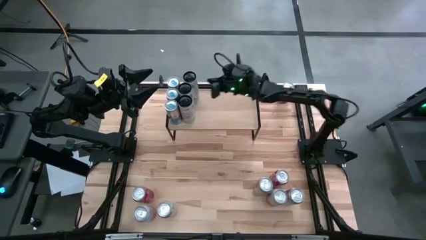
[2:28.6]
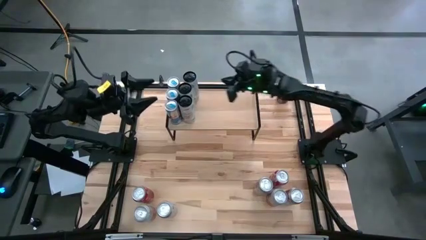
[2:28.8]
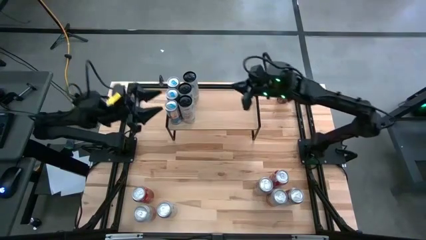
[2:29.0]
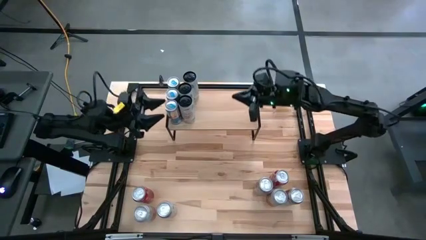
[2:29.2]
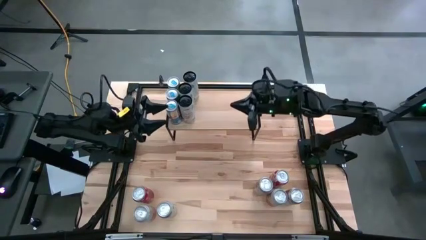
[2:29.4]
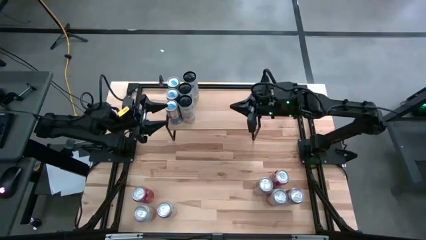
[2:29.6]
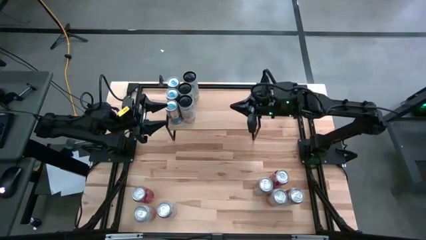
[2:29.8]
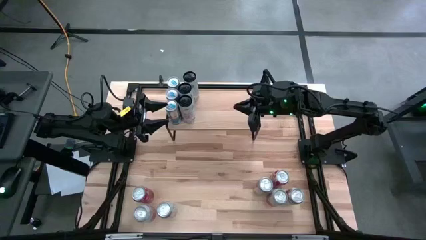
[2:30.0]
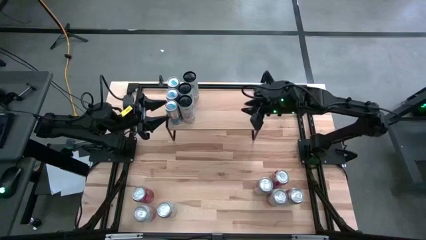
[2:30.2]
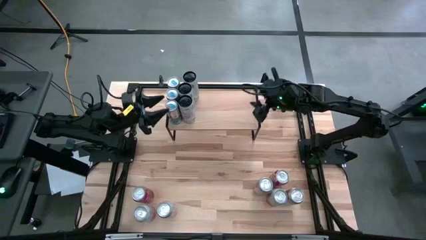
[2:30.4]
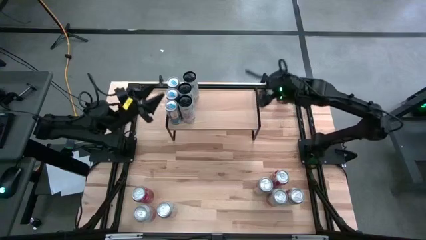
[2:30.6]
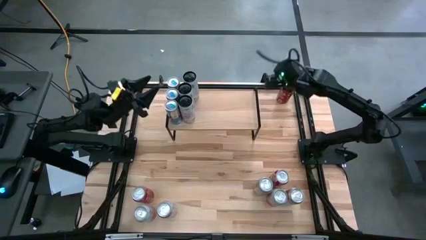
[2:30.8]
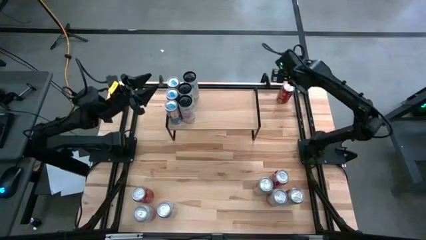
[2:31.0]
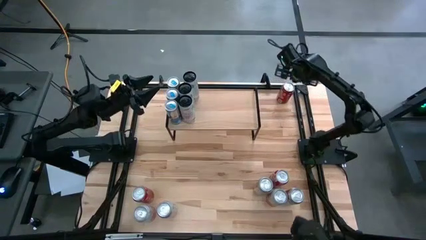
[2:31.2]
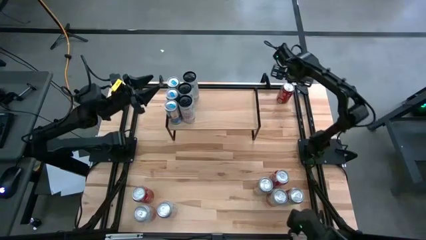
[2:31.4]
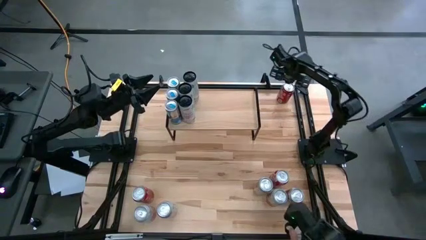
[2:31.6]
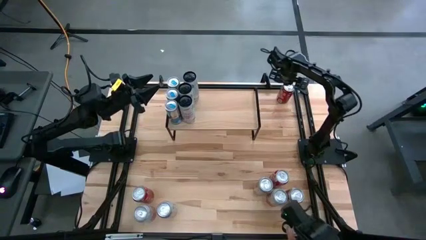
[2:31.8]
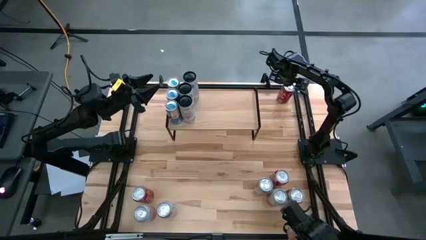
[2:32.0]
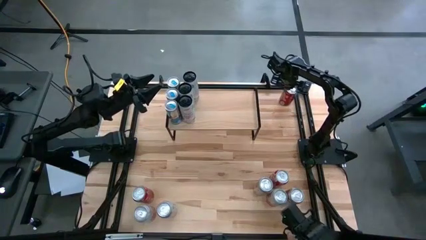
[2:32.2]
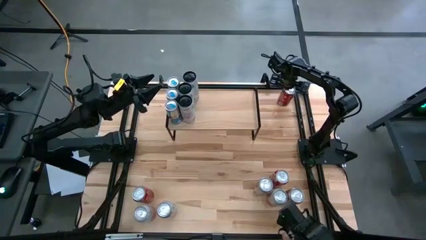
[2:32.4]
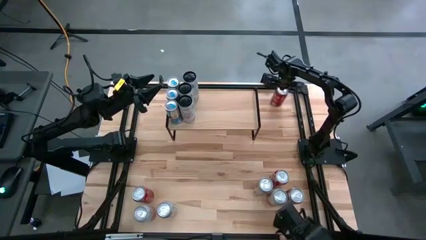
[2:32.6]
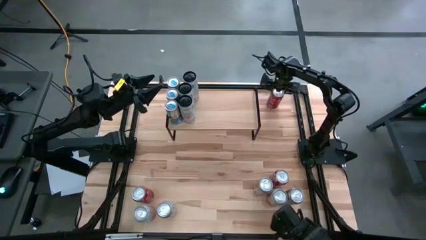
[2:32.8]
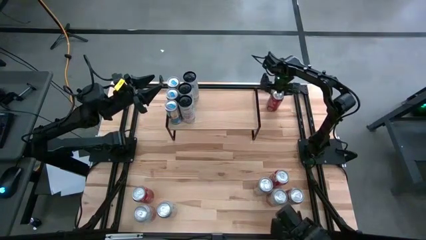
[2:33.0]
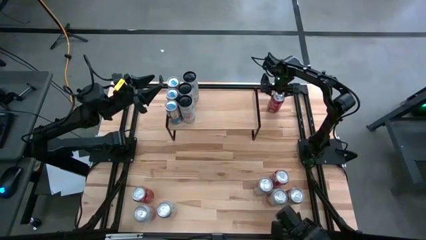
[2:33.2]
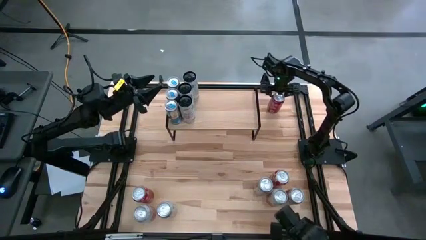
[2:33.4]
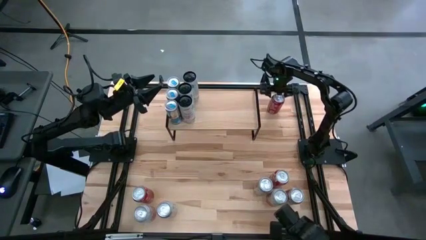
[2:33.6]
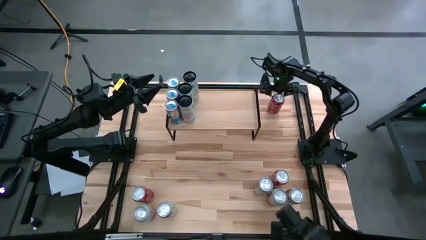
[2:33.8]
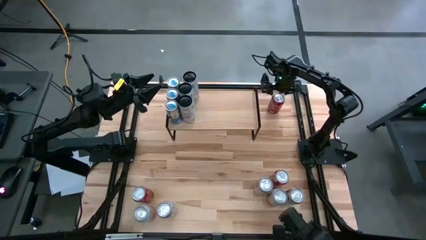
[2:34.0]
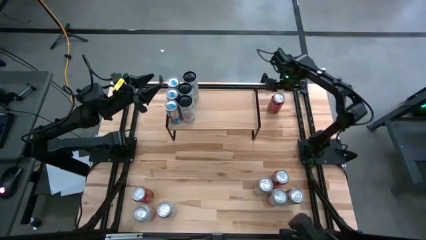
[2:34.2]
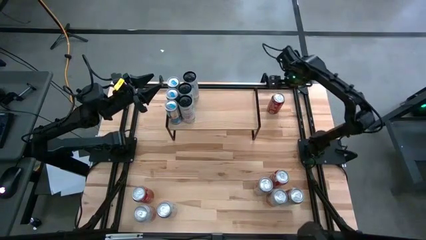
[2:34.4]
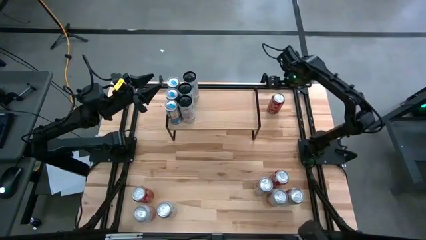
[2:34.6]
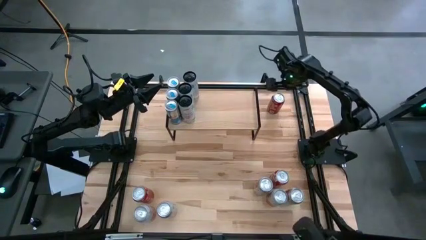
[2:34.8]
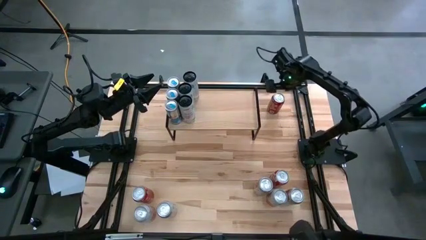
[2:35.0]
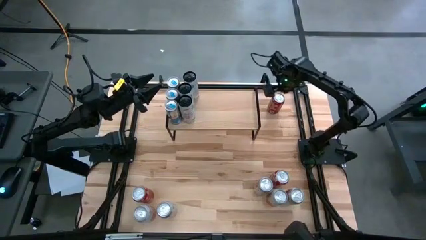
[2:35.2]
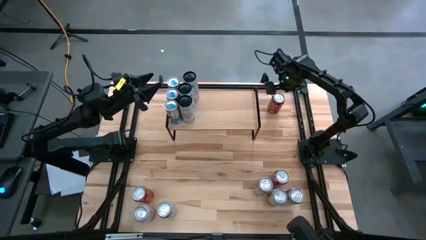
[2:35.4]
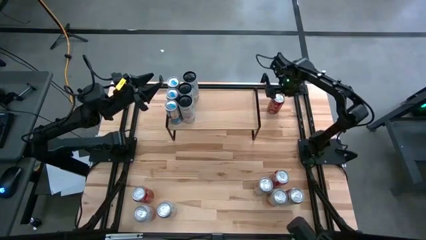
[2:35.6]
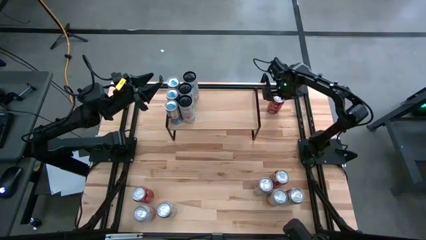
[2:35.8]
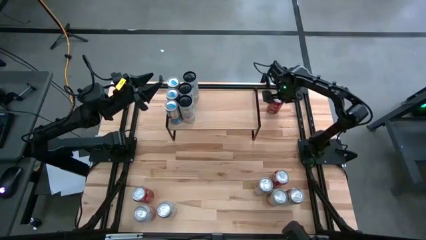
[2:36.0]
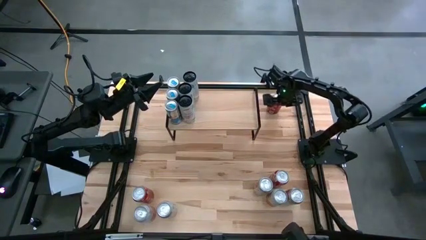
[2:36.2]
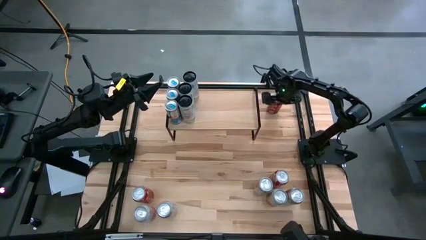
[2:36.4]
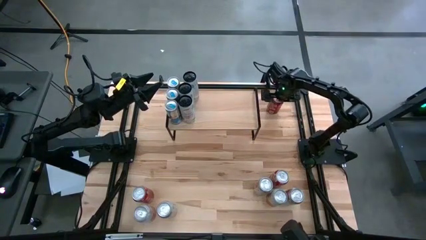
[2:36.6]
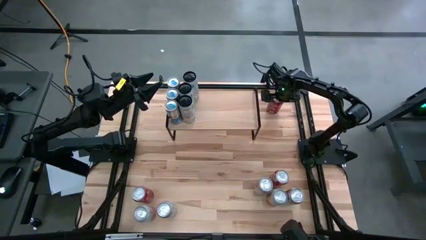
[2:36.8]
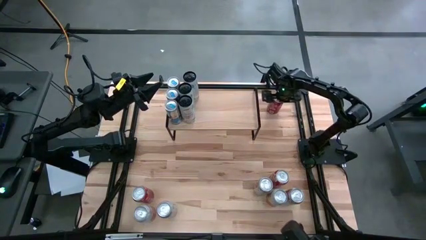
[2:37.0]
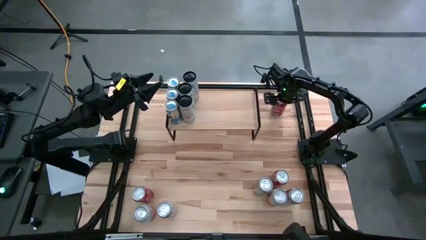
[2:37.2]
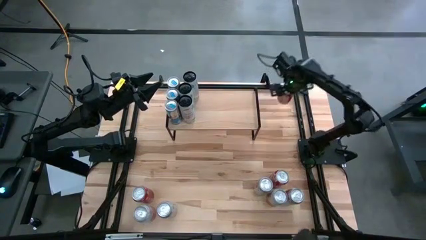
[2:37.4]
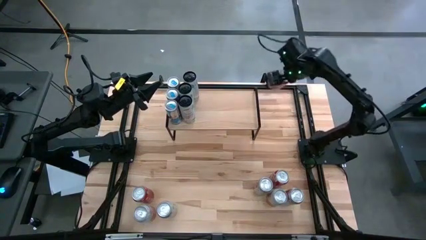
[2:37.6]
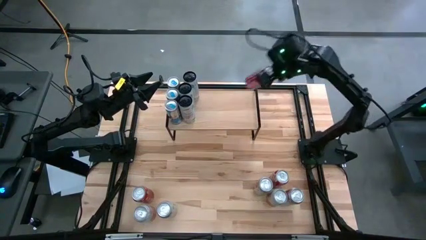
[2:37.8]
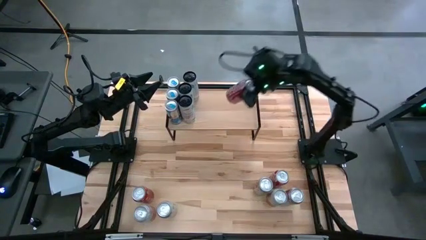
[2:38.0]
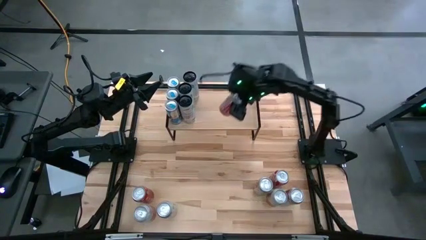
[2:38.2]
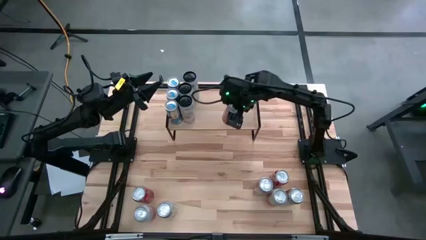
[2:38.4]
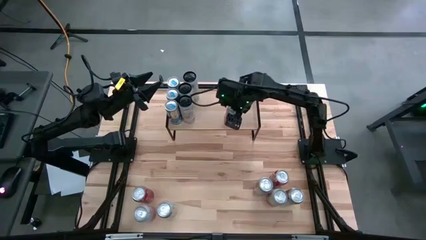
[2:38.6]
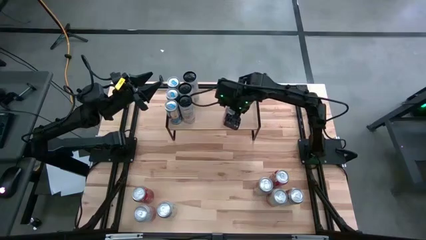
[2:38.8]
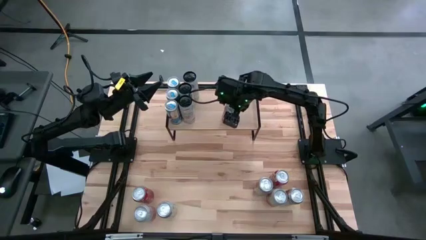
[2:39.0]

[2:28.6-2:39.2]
Task: Place canned beverage on shelf
Put the top red-white soda can on the shelf

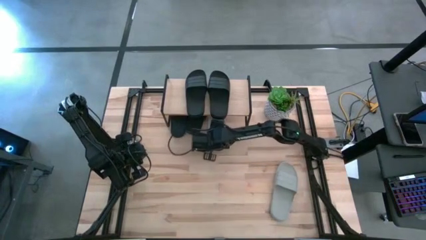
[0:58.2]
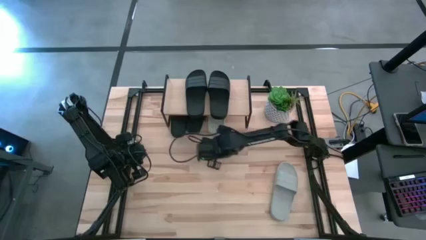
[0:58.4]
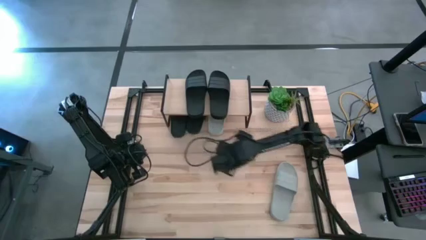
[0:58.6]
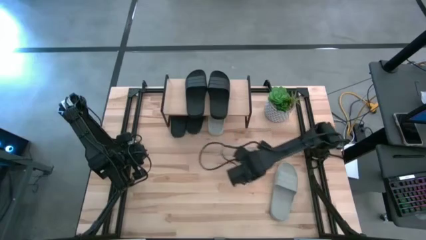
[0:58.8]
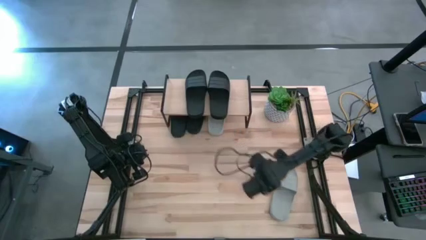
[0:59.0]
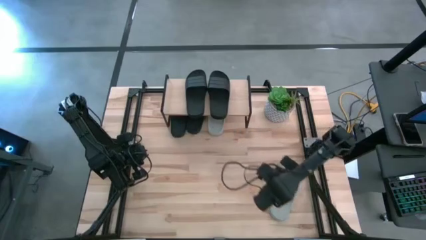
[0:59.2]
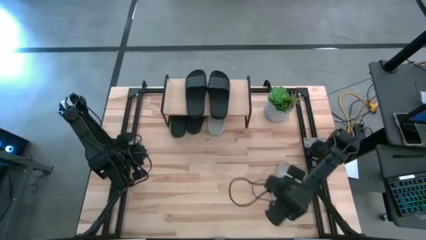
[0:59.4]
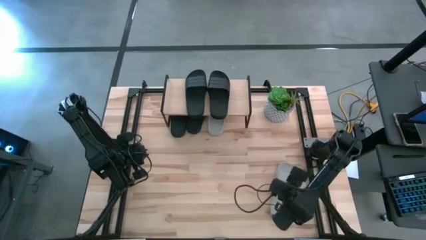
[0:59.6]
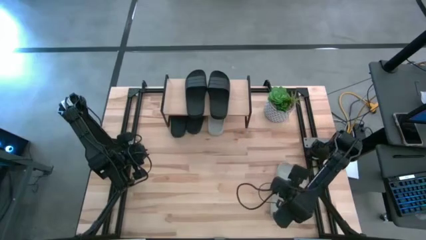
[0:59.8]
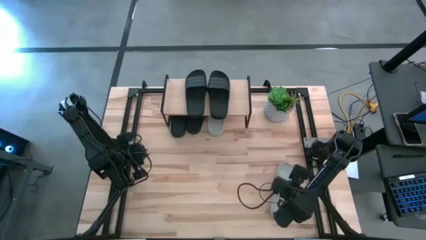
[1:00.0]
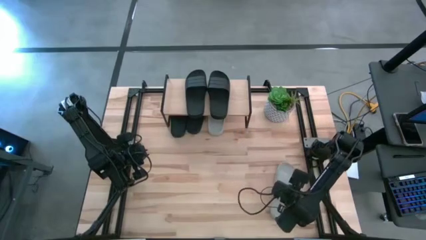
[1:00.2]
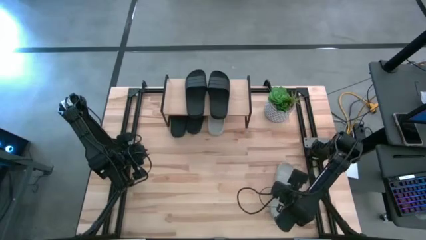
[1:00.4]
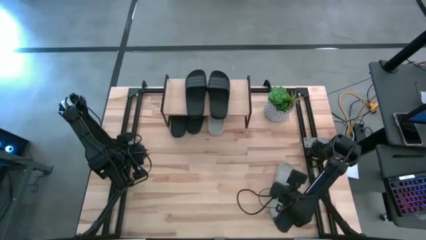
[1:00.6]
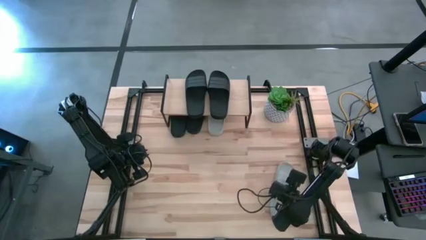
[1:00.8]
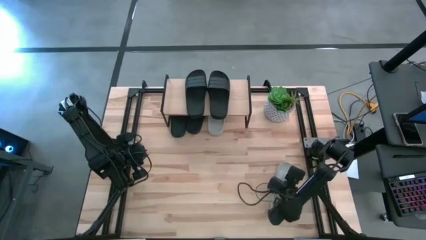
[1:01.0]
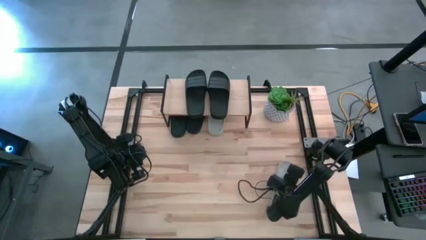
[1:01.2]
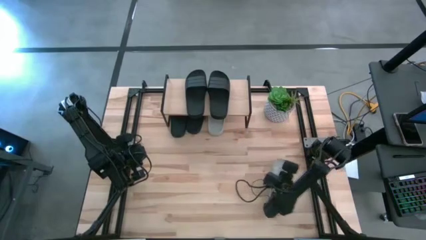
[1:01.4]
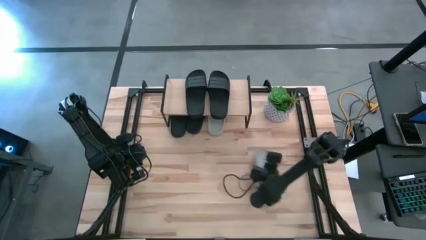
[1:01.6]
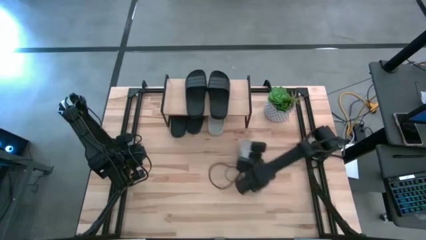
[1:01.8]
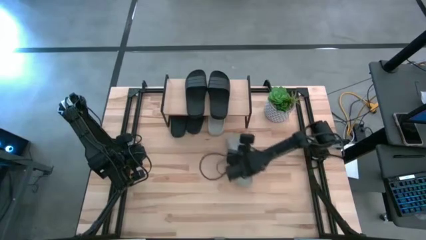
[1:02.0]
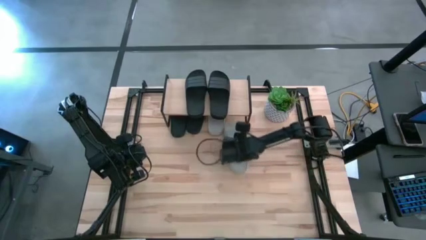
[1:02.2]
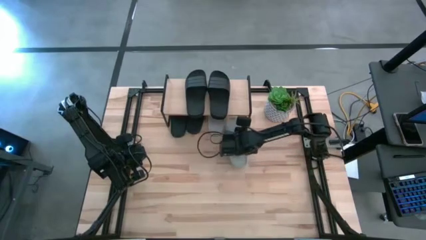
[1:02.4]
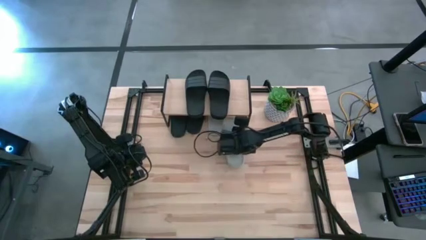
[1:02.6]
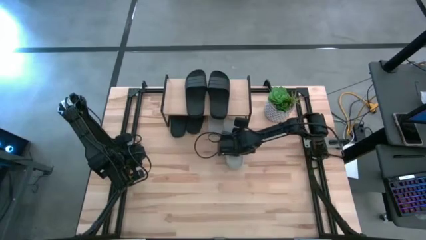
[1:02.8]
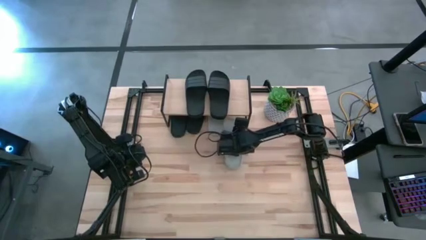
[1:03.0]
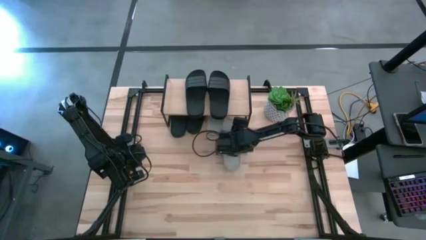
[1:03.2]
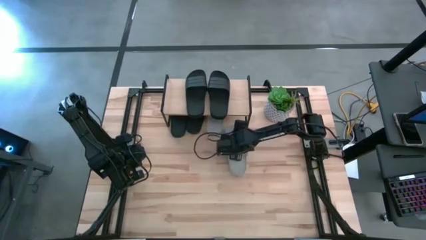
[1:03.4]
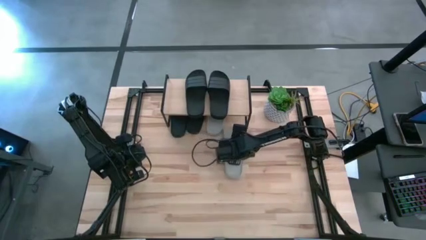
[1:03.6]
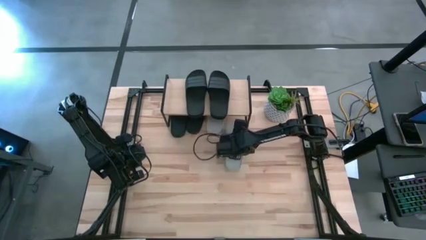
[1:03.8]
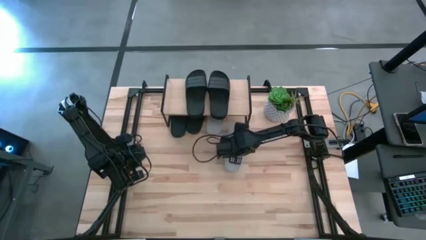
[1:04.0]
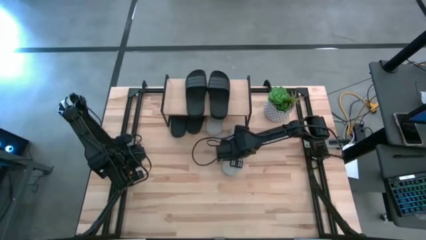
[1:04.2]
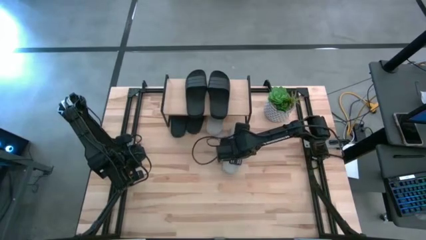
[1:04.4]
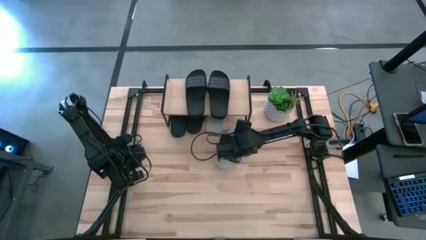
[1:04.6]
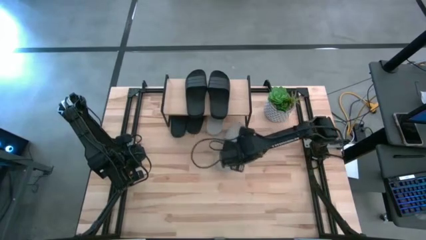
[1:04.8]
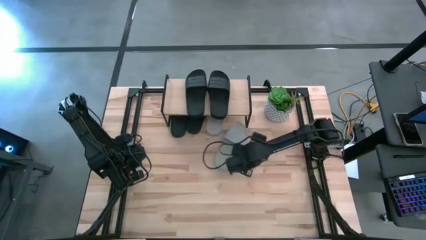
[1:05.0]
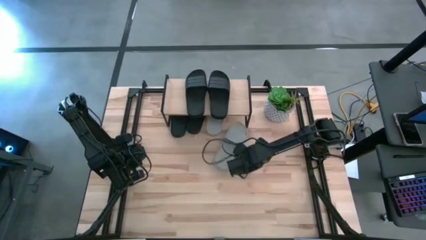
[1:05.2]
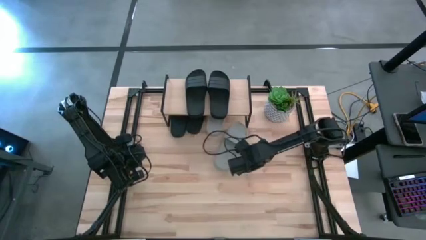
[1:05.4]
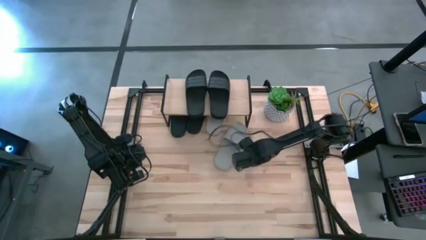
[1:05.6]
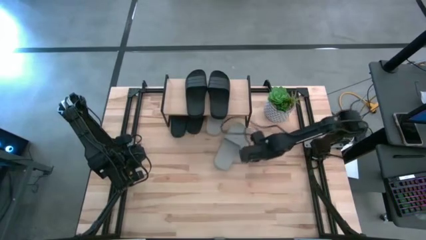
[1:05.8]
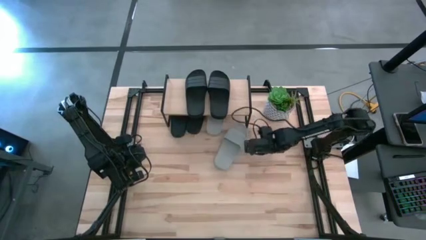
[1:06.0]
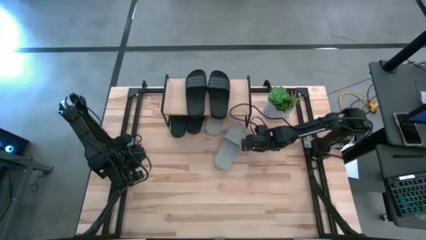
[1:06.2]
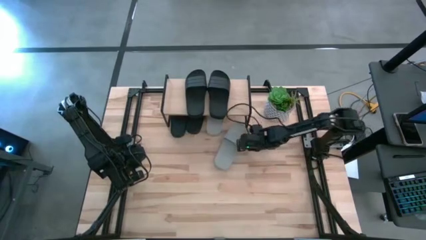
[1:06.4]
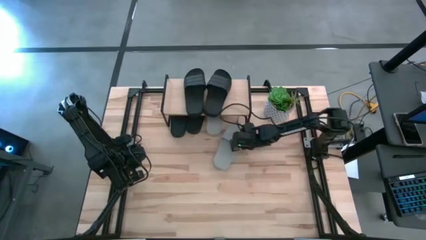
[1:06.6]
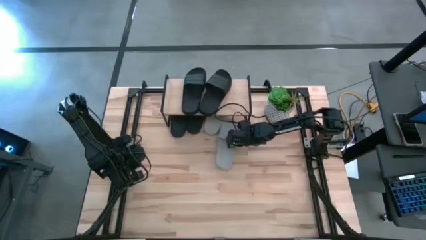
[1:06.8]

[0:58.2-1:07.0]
Task: Pick and place slides into the shelf
Put the gray slide under the shelf
